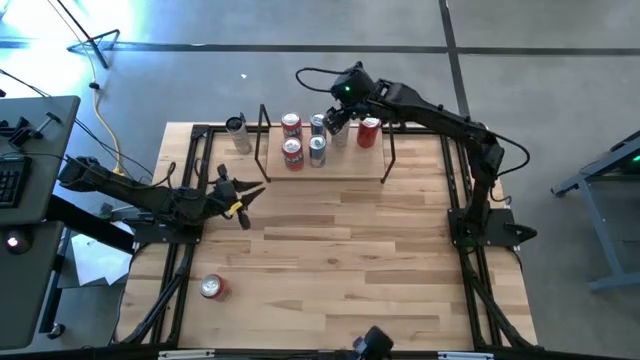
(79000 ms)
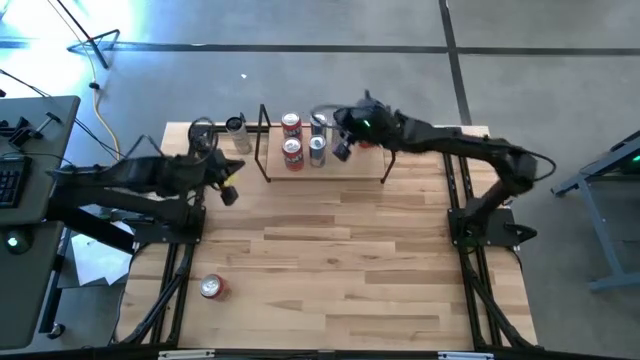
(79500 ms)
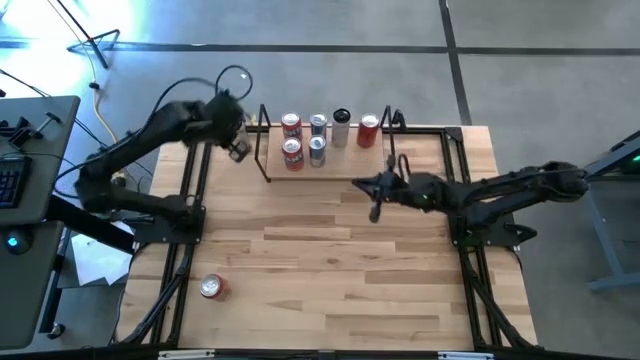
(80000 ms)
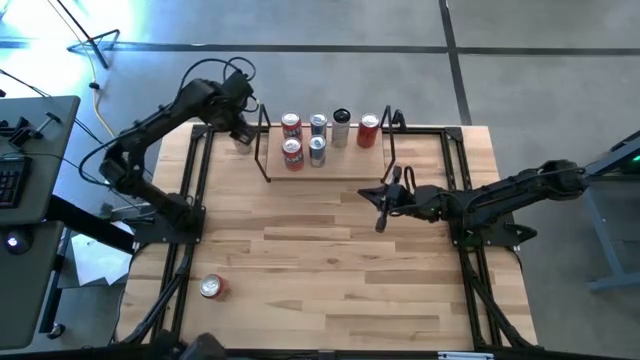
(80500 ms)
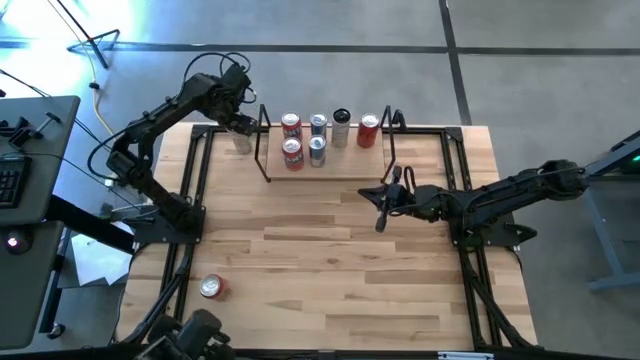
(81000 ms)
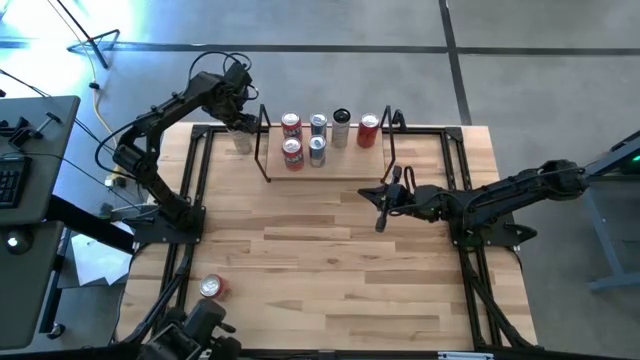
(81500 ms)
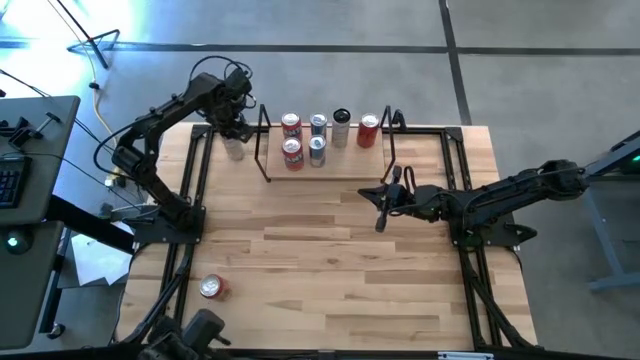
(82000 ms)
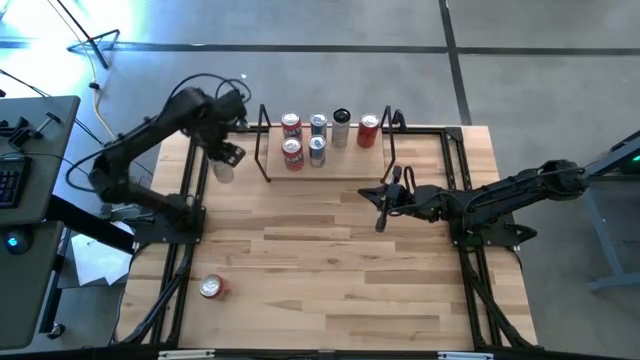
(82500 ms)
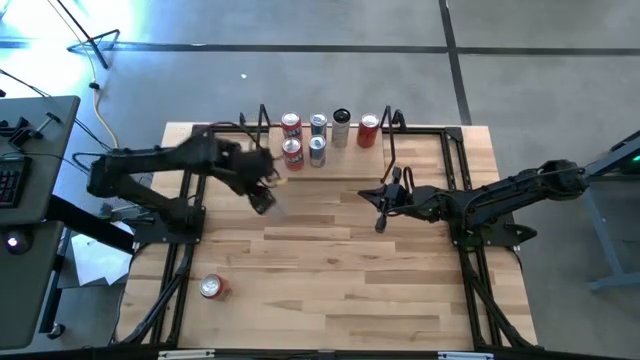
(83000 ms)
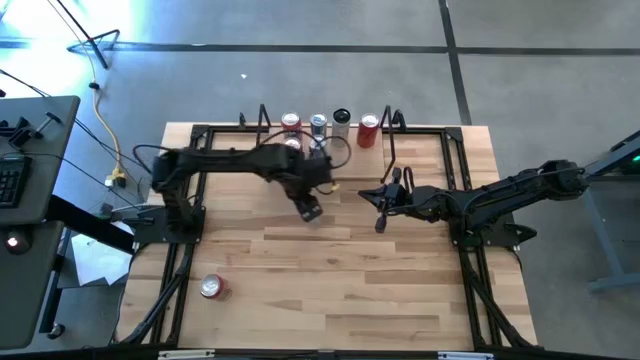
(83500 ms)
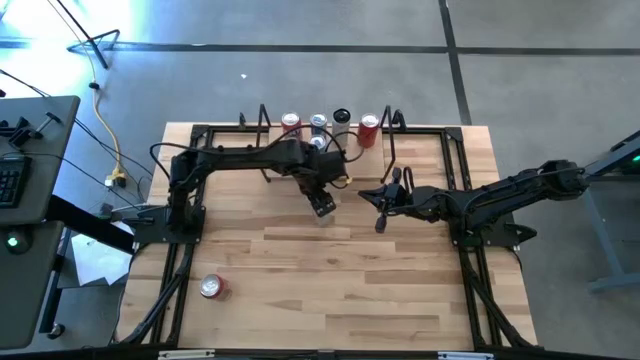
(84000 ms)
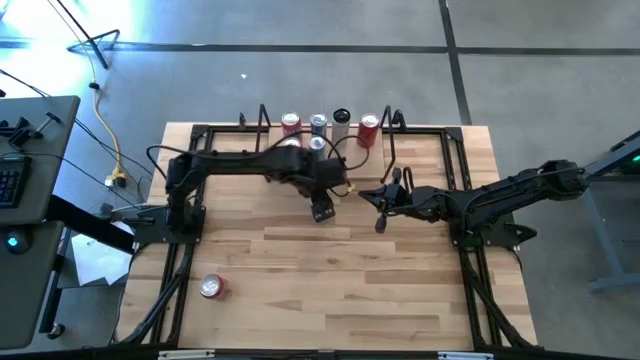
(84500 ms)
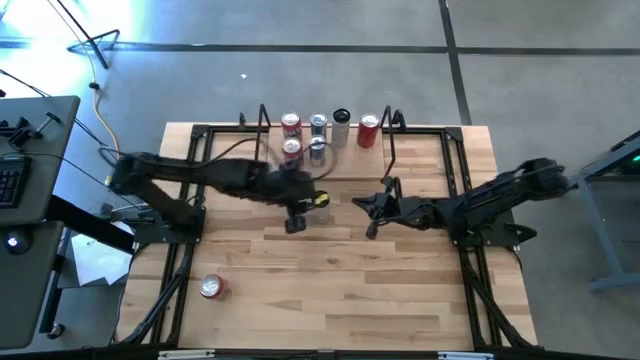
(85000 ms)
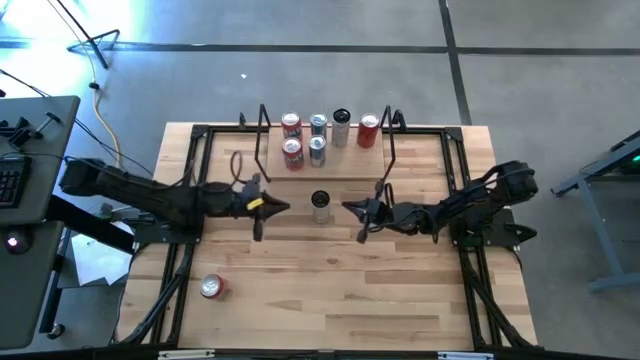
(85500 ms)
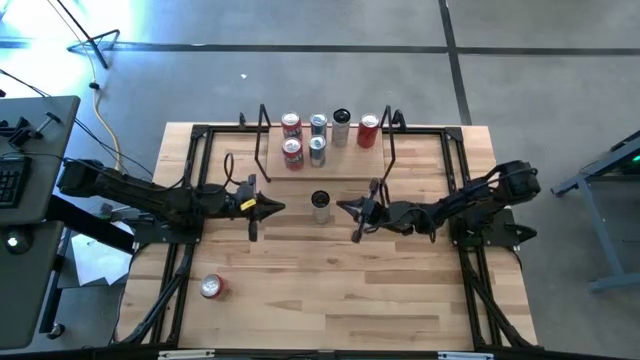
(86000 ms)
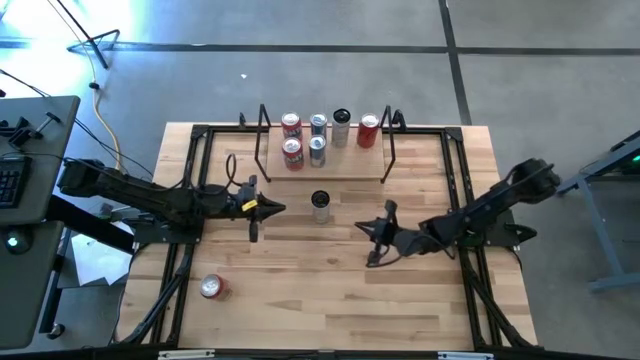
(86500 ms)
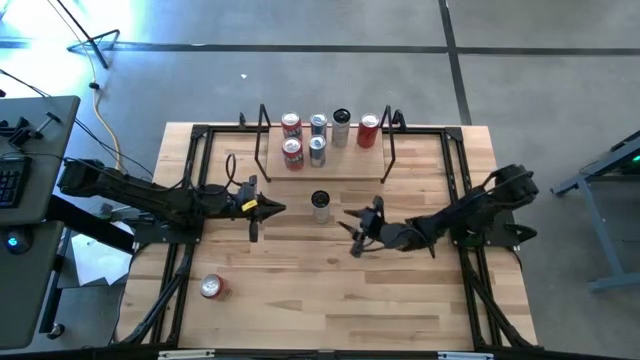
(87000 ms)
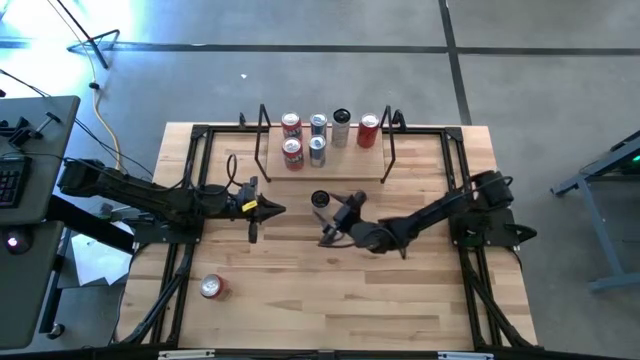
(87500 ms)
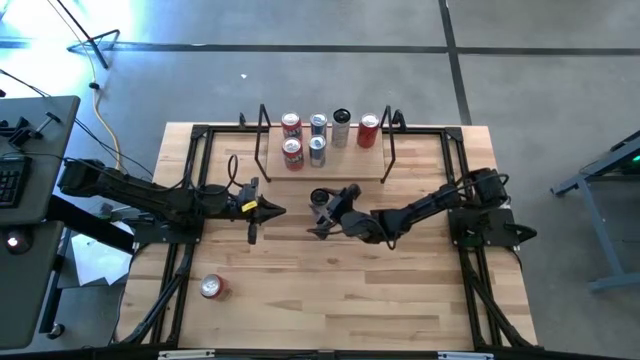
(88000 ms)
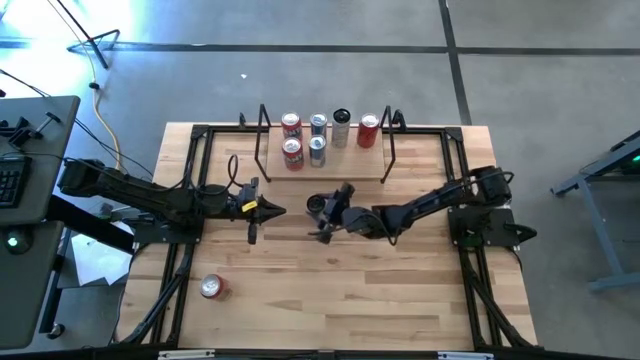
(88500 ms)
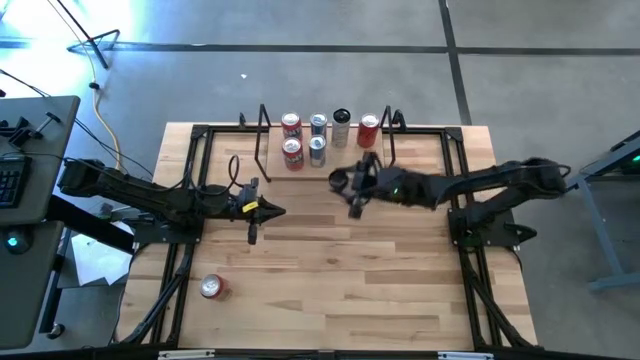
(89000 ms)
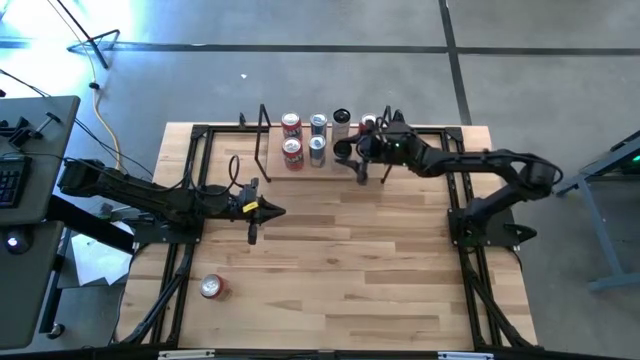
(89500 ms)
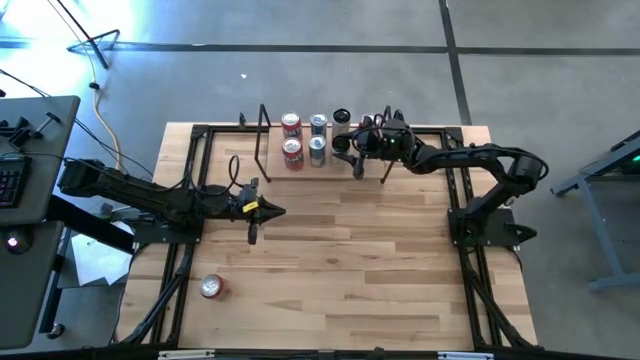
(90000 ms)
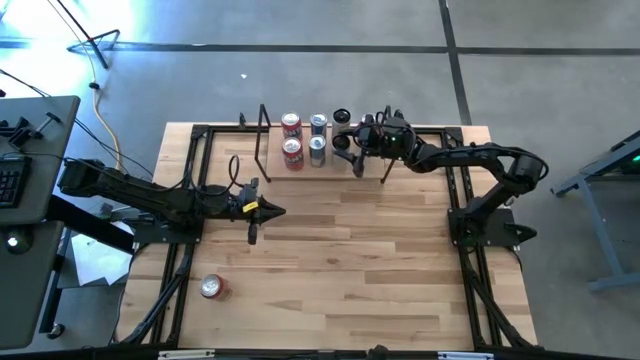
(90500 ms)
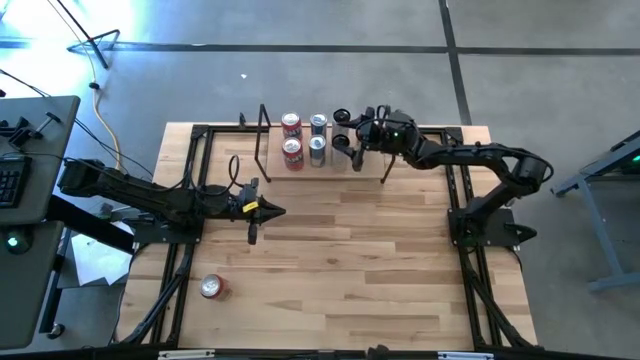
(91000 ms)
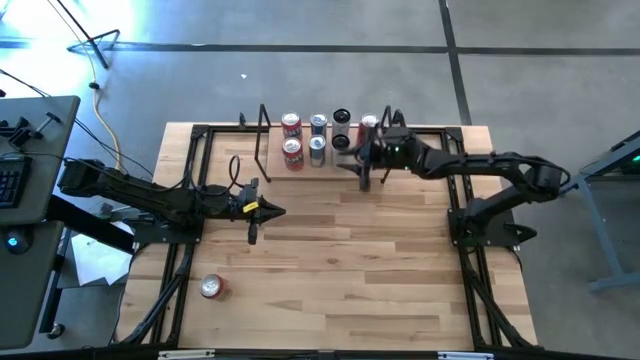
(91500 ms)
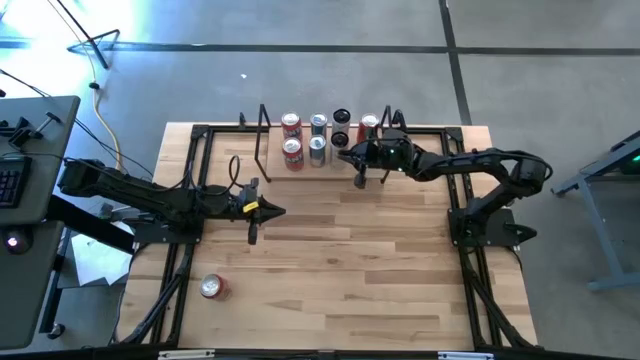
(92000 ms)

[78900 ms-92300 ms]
Task: Place canned beverage on shelf
Put the white yellow soda can on the shelf aligned with the other white yellow soda can
